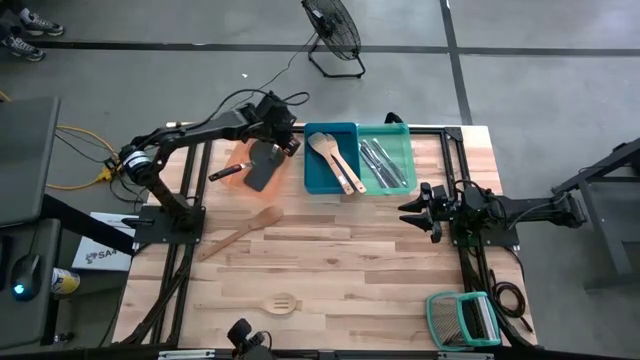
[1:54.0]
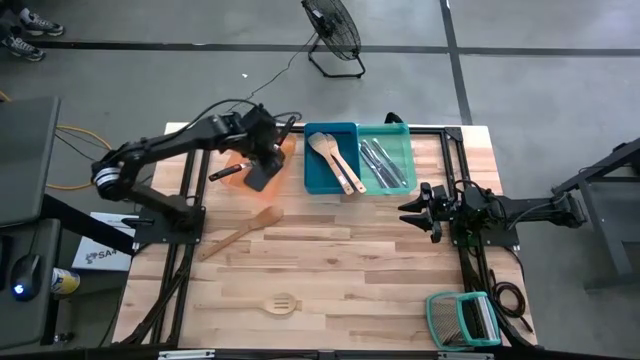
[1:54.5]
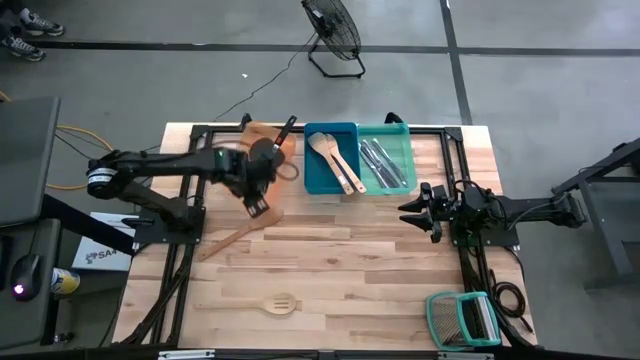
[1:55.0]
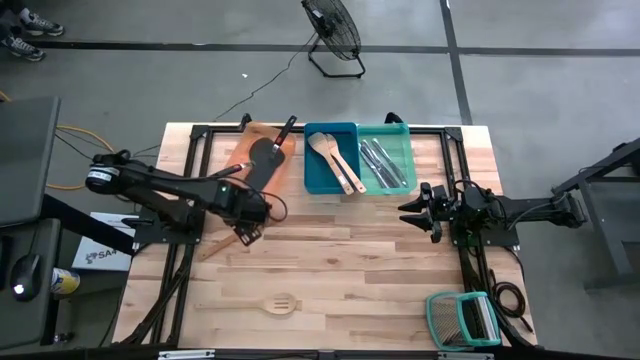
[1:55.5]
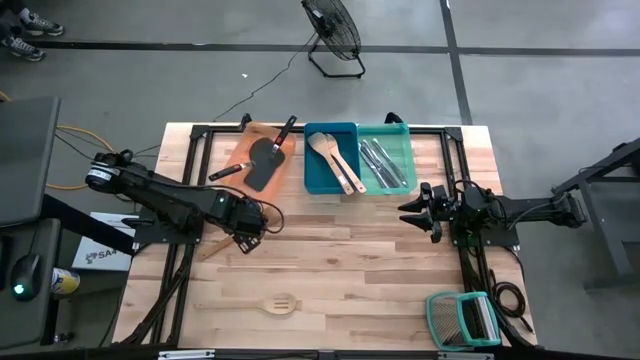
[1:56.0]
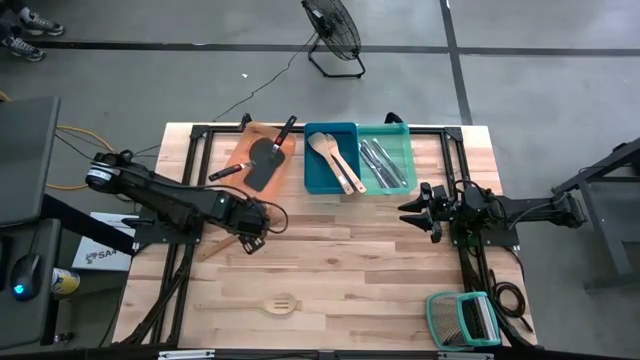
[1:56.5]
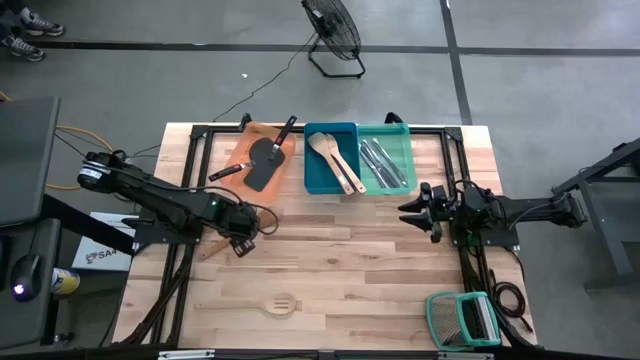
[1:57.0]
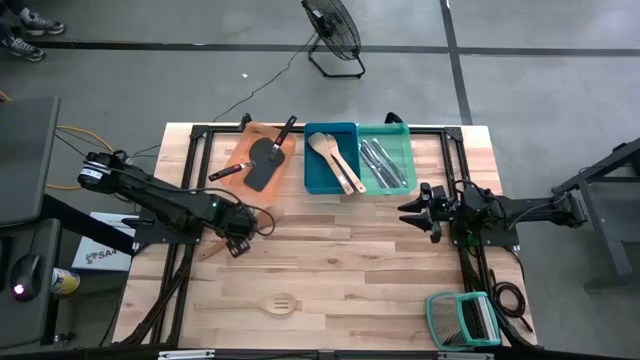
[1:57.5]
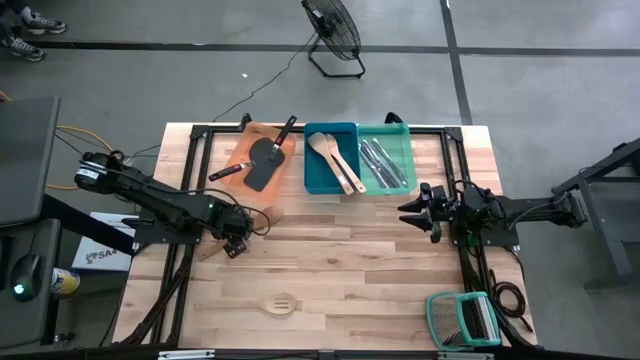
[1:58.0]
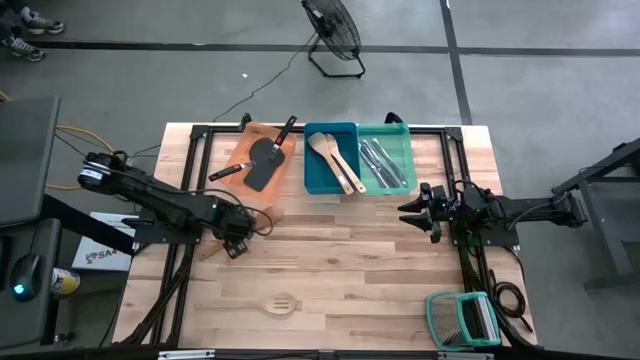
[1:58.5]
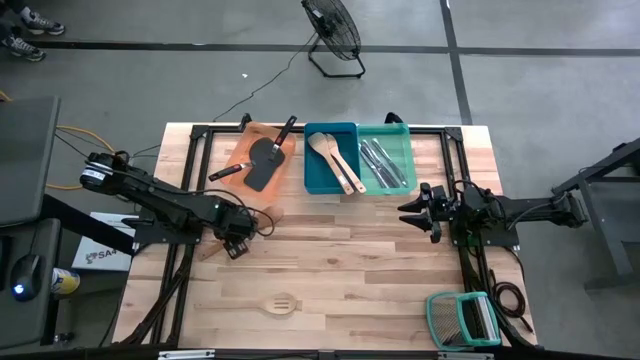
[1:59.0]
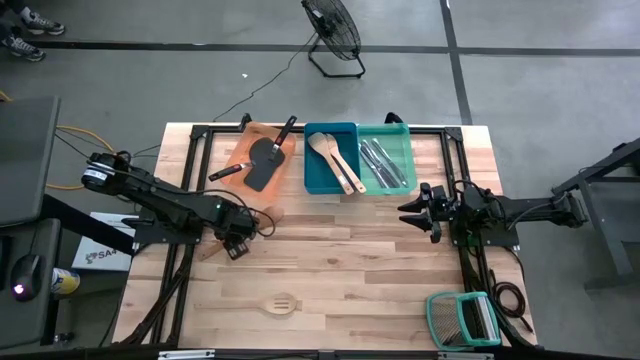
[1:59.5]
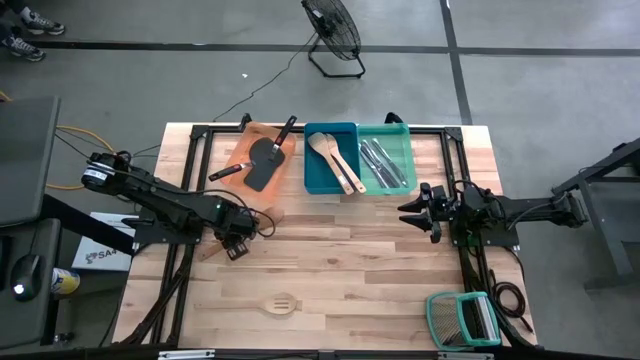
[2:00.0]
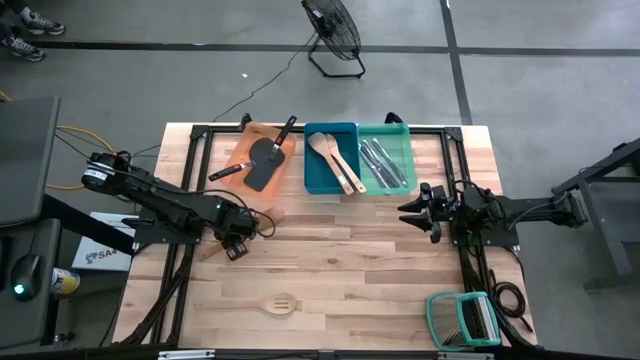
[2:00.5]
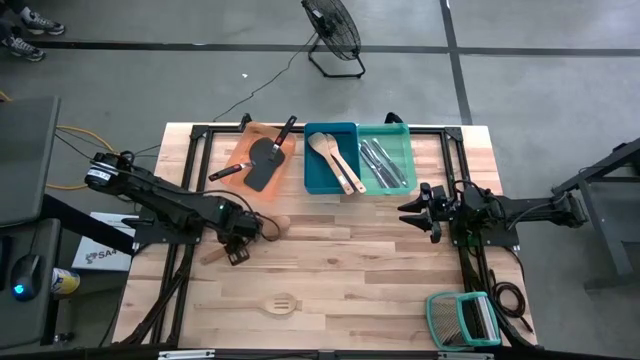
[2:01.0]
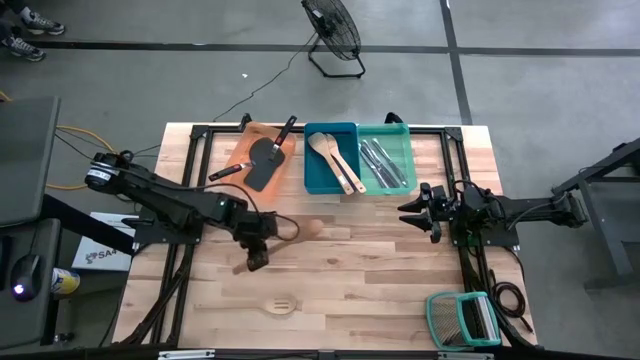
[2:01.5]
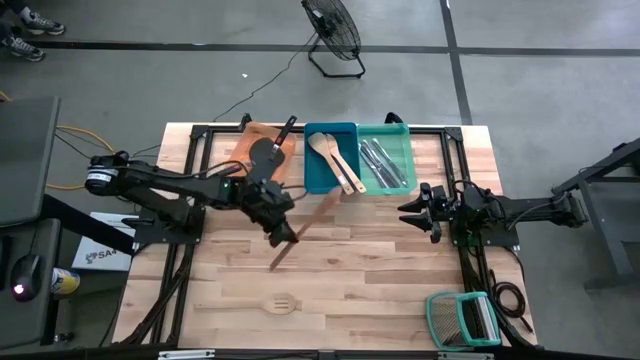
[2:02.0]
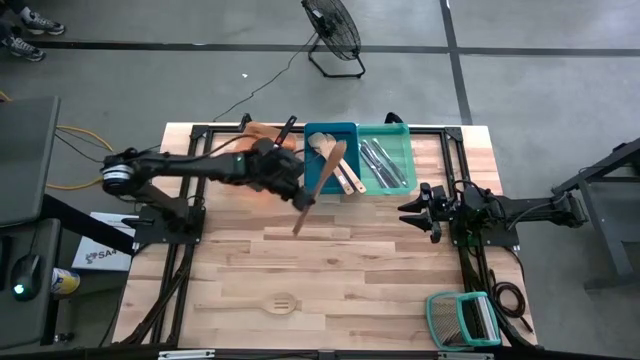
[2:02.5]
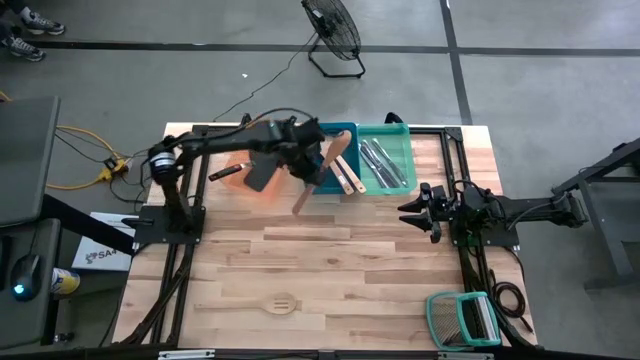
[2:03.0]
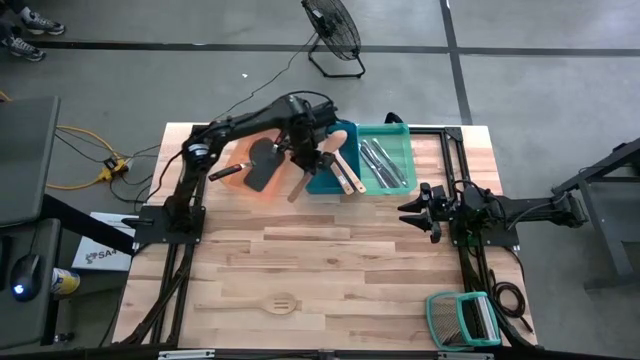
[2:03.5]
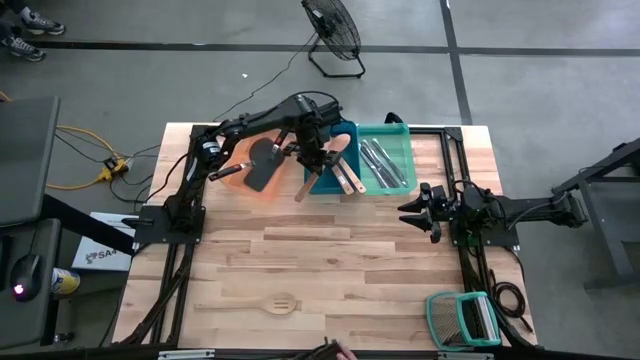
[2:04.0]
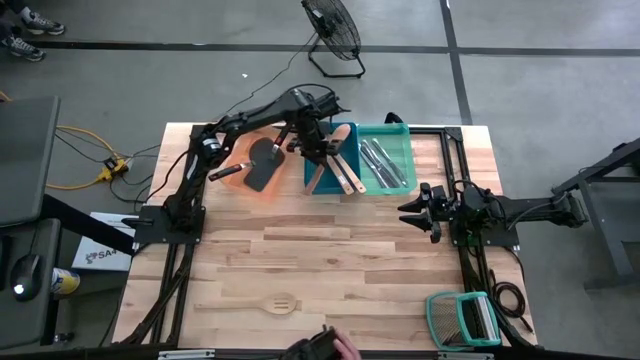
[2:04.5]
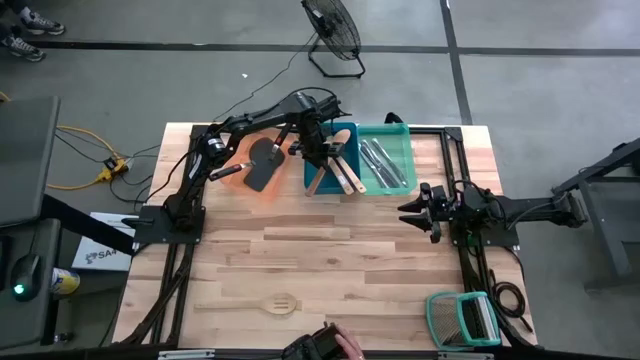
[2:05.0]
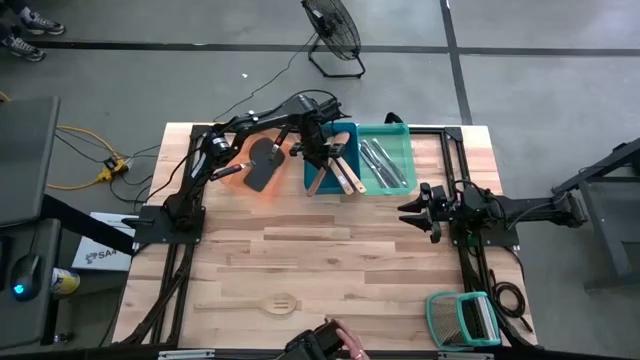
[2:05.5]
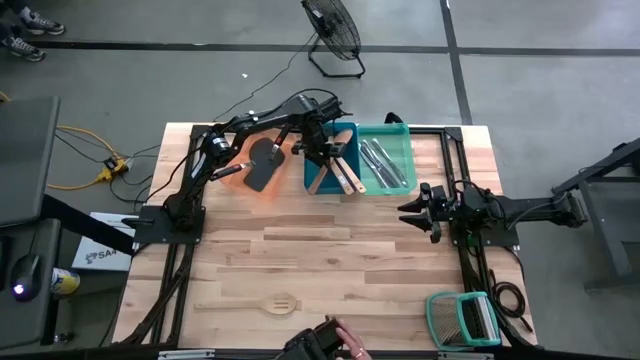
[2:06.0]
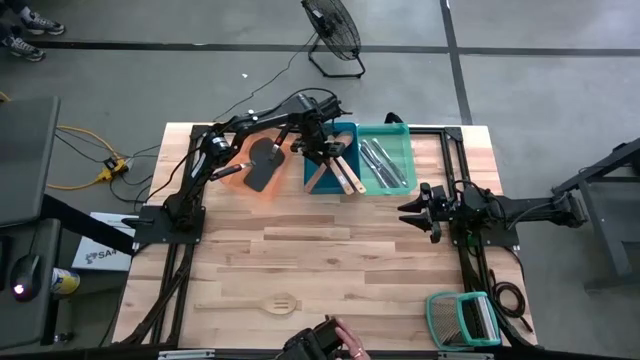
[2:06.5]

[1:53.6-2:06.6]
Task: Pick & Place Kitchen Items
Put the brown wooden spoon into the blue bin

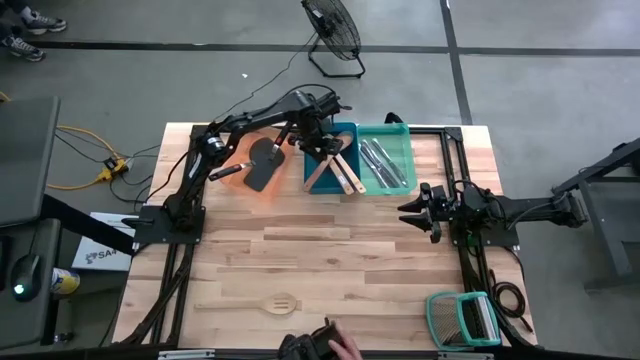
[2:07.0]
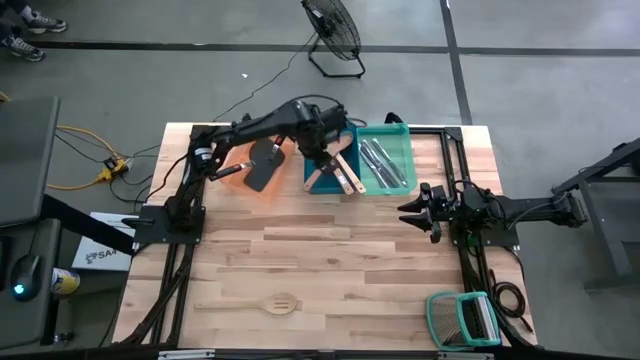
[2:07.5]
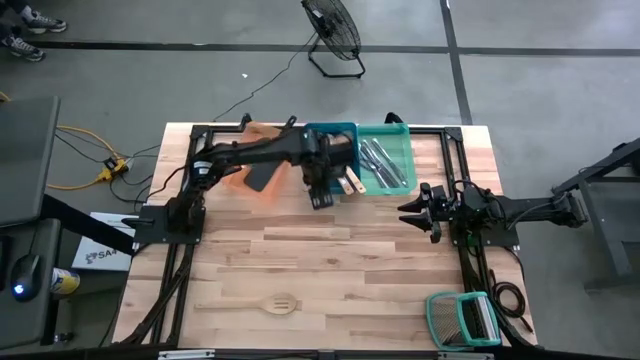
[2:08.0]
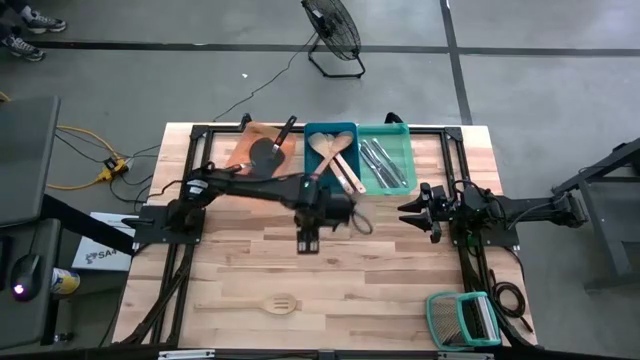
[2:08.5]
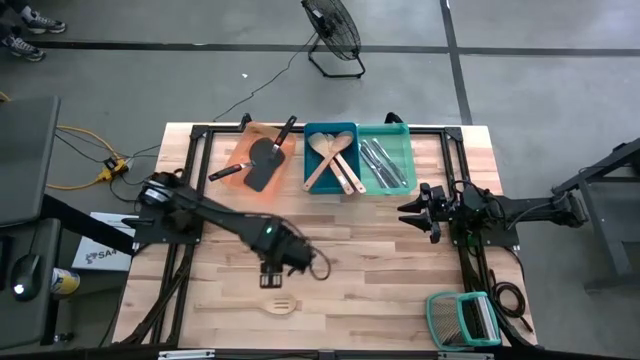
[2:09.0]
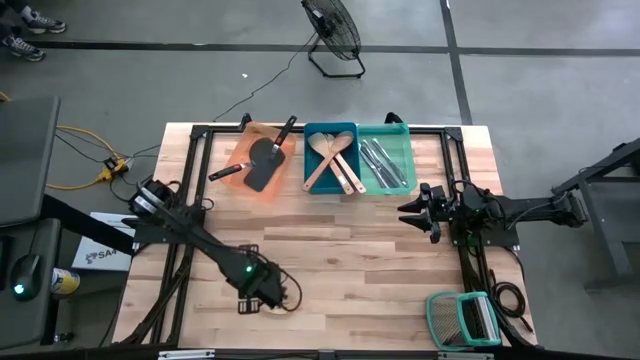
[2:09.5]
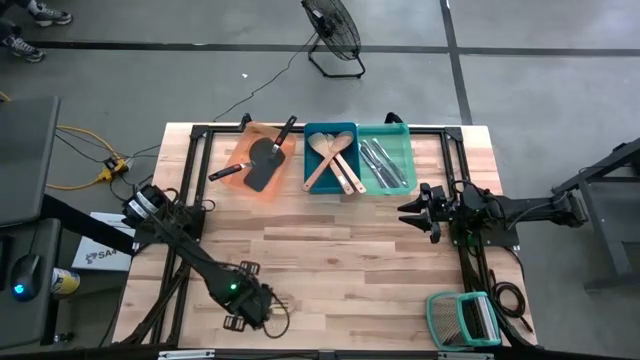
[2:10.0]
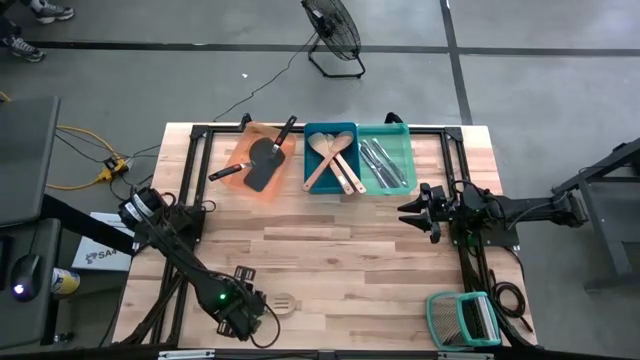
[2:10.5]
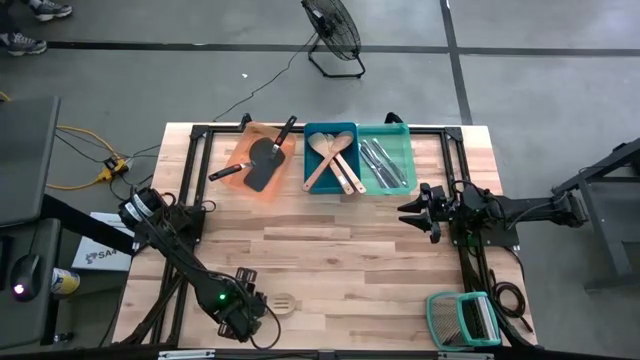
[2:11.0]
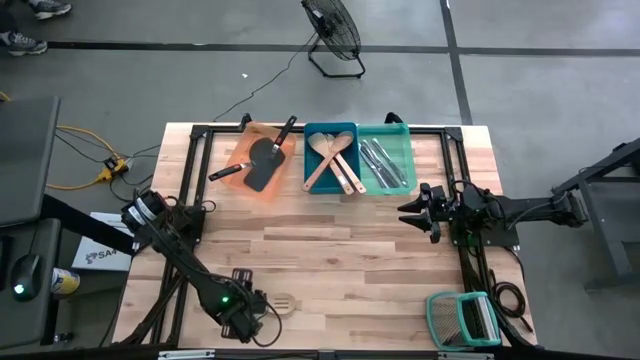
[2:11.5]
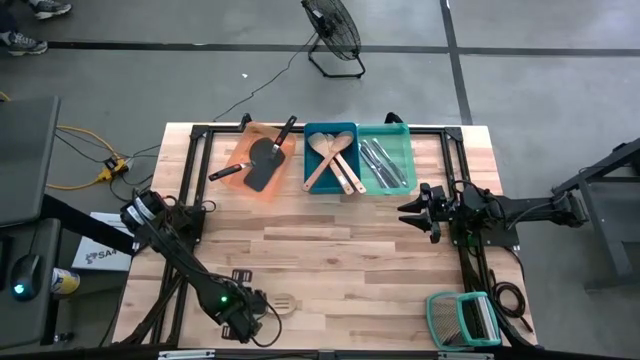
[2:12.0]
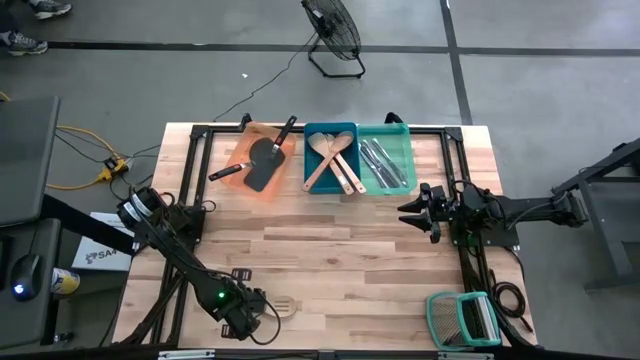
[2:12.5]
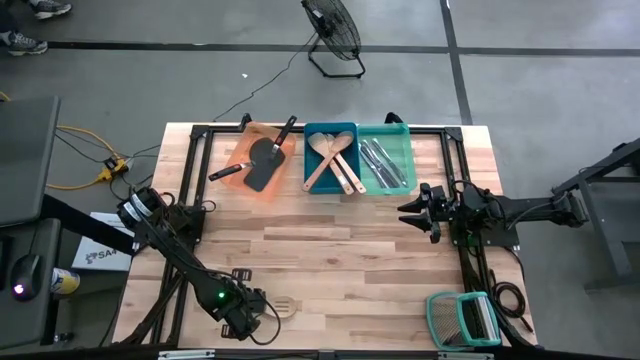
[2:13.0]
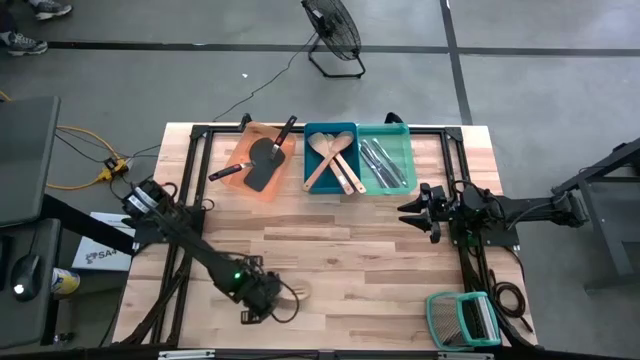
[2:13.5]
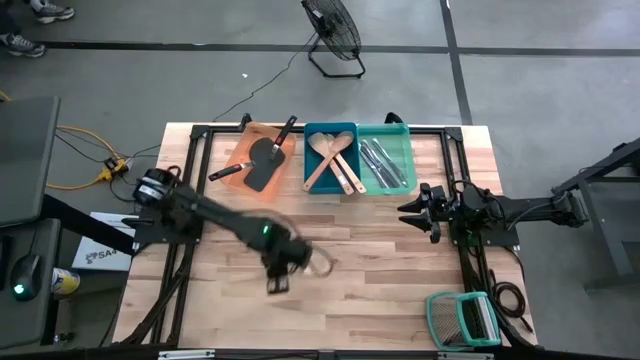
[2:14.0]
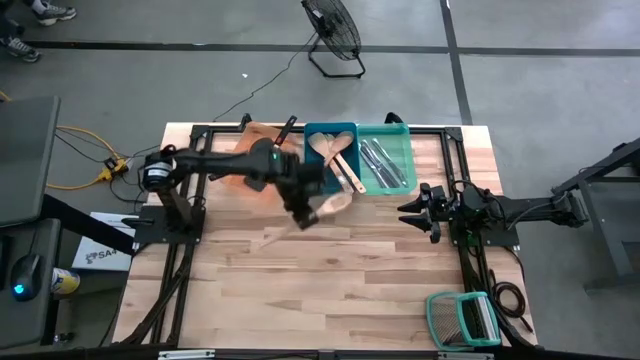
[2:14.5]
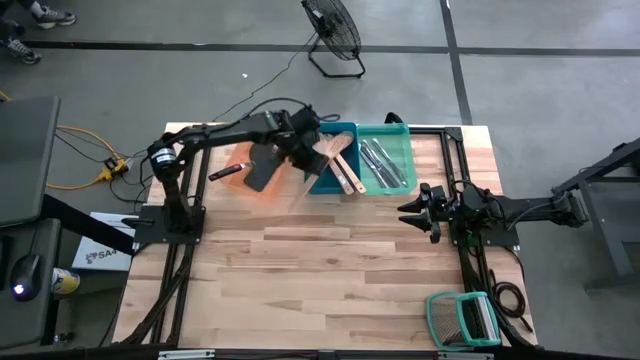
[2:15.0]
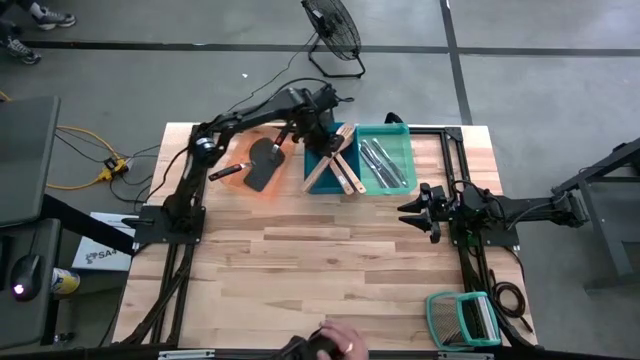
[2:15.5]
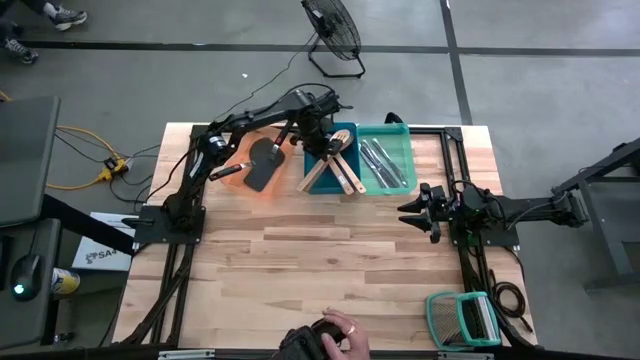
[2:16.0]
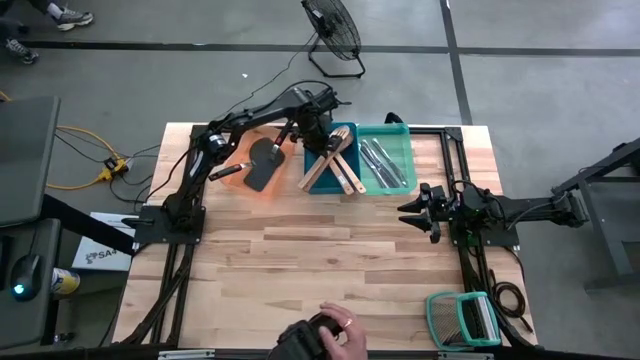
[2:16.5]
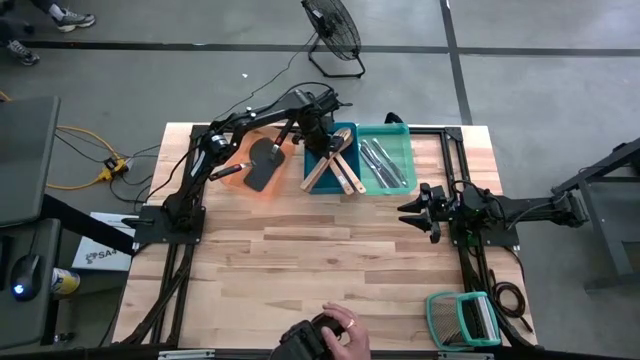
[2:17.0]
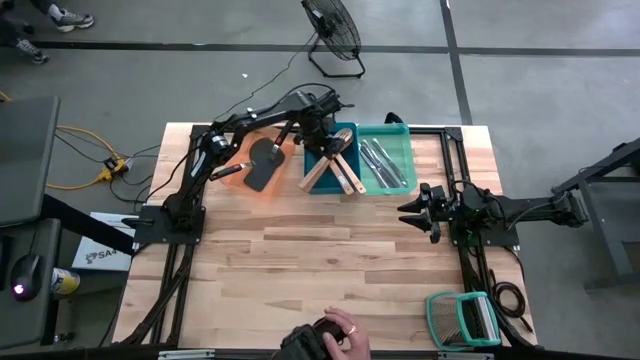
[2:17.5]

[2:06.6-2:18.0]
Put the brown wooden spoon into the blue bin
